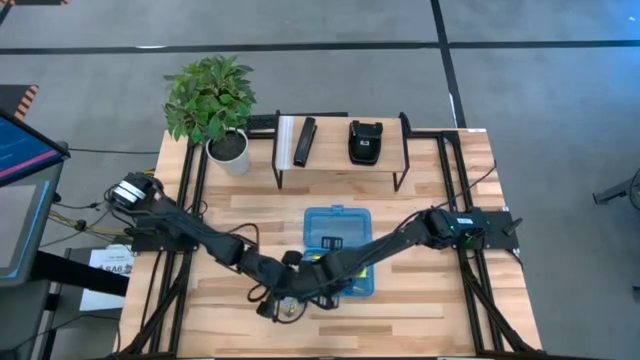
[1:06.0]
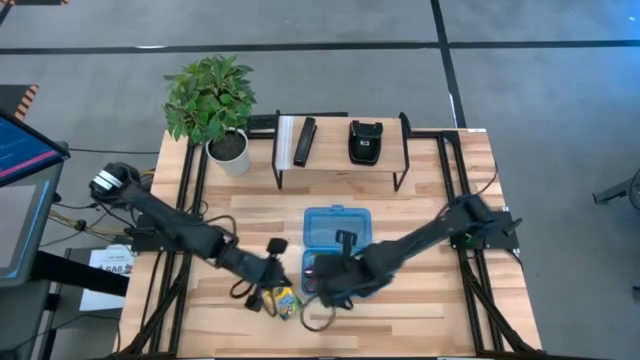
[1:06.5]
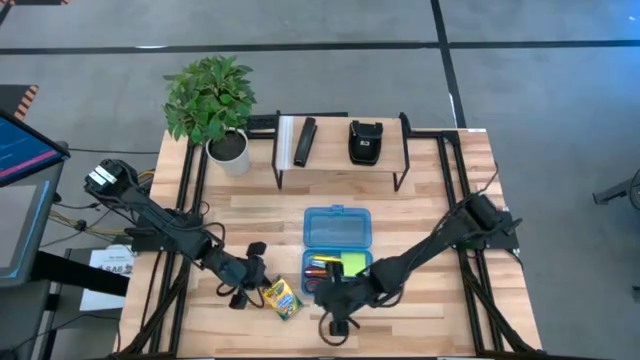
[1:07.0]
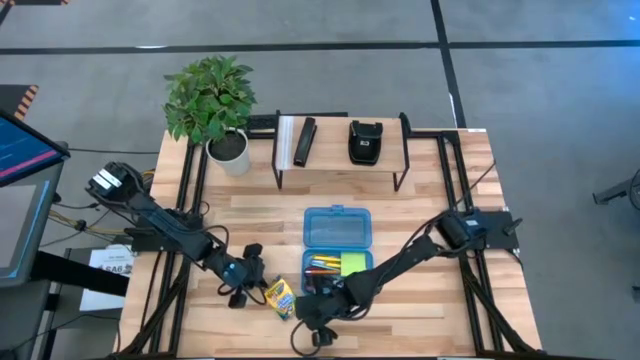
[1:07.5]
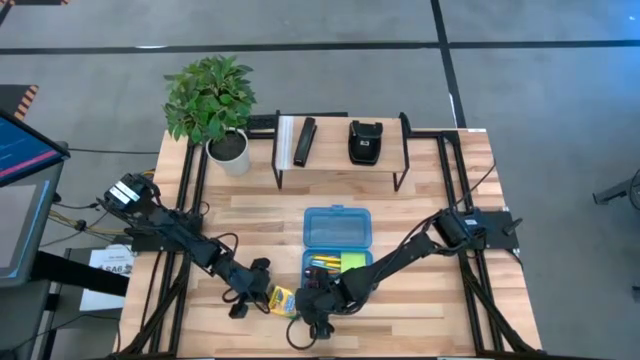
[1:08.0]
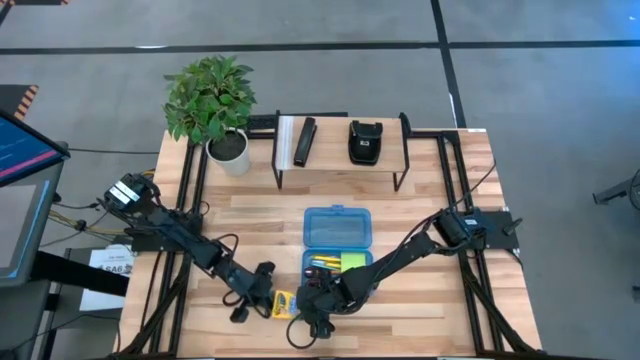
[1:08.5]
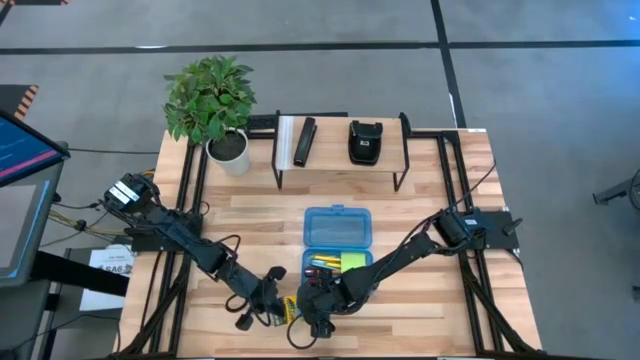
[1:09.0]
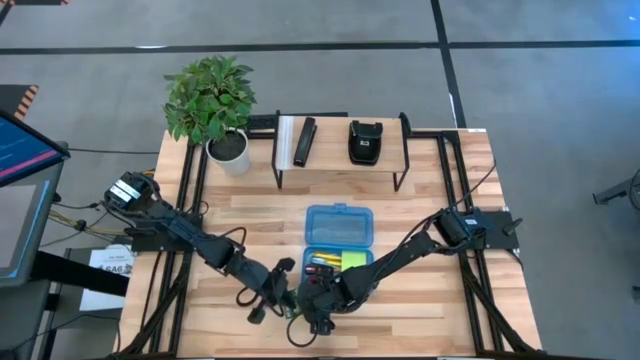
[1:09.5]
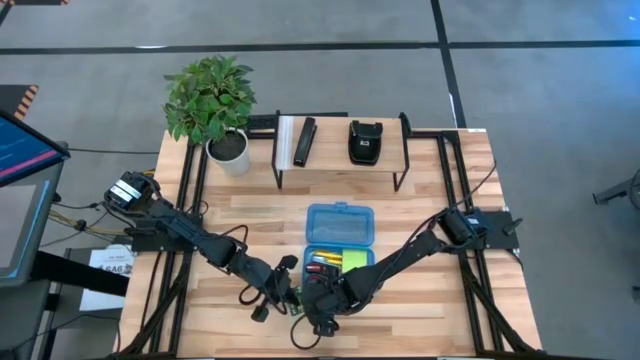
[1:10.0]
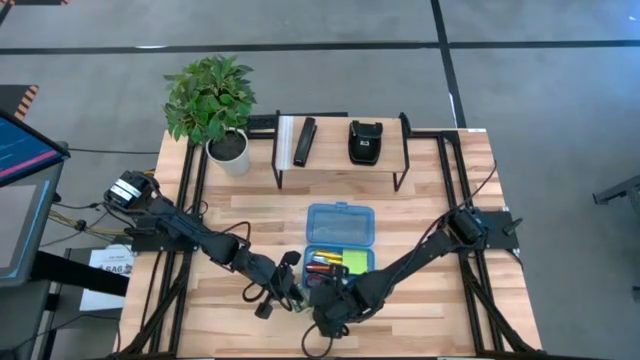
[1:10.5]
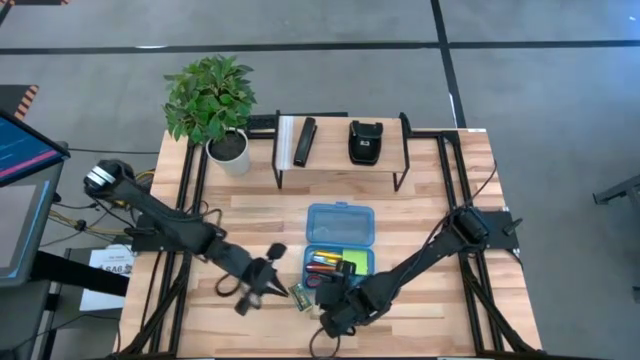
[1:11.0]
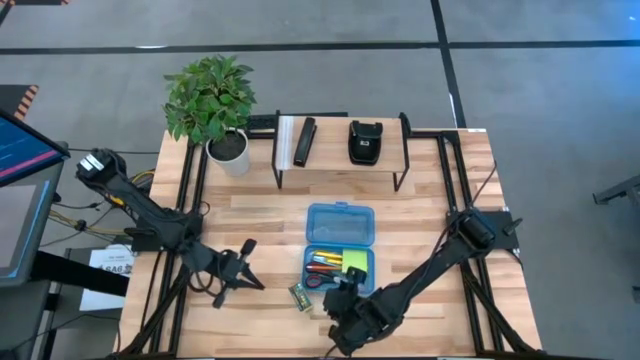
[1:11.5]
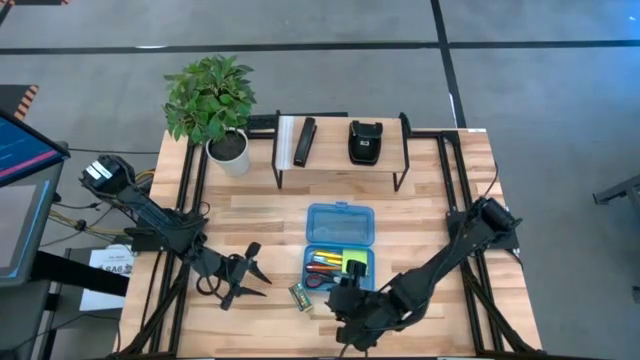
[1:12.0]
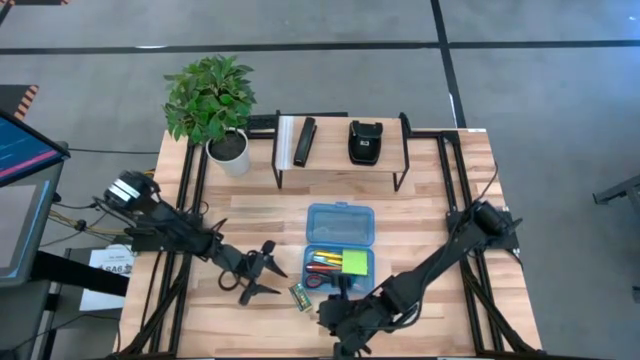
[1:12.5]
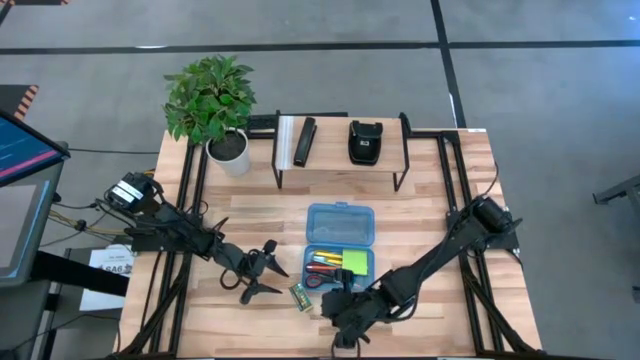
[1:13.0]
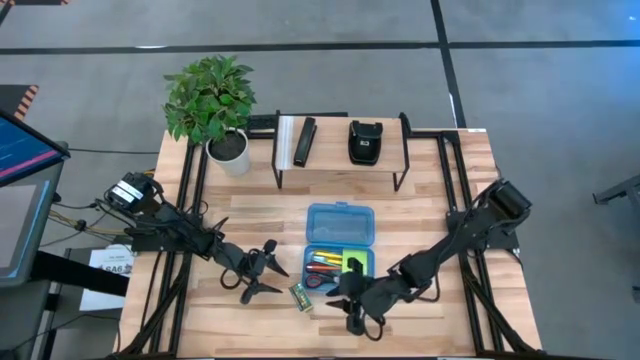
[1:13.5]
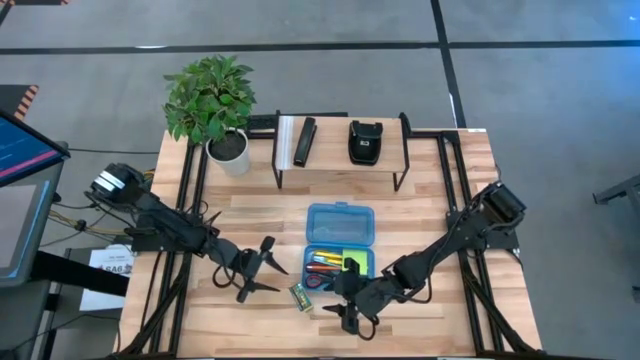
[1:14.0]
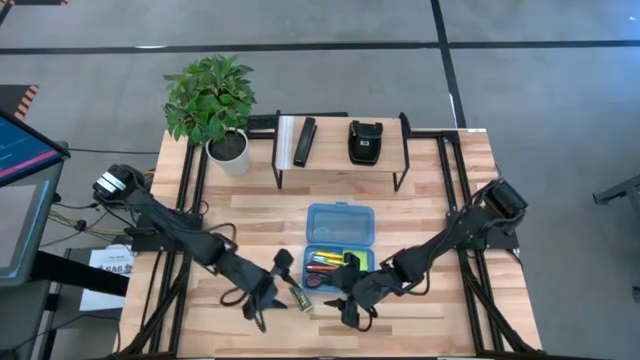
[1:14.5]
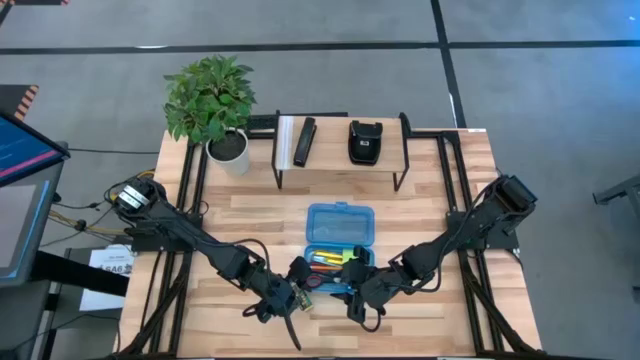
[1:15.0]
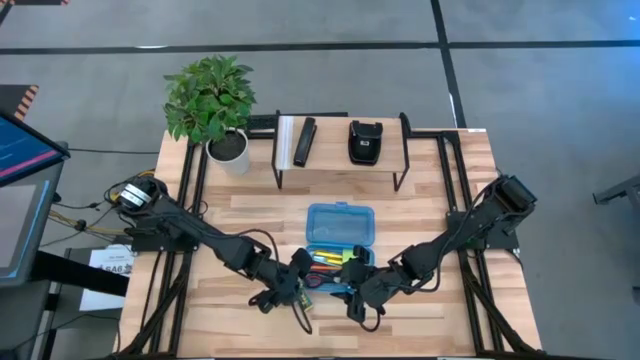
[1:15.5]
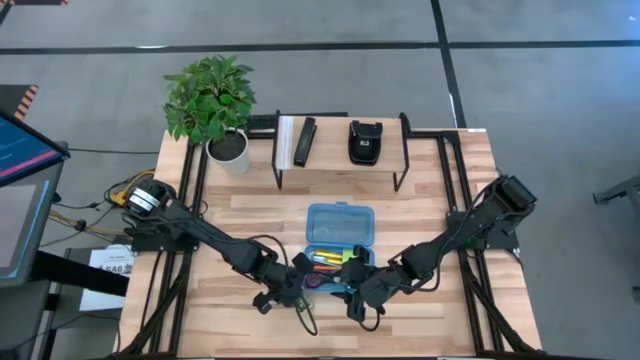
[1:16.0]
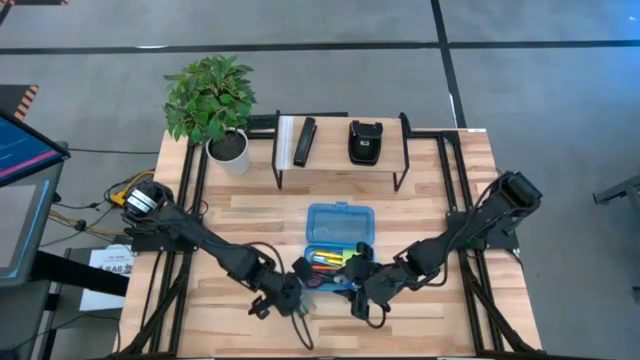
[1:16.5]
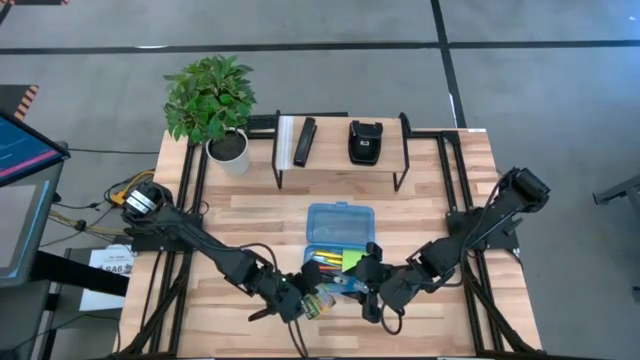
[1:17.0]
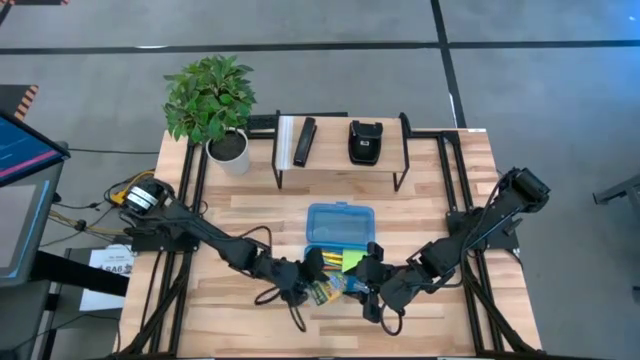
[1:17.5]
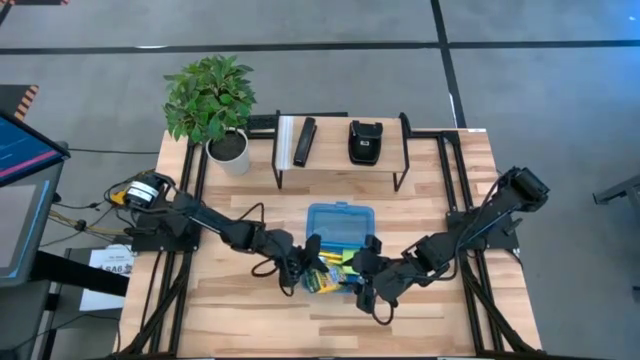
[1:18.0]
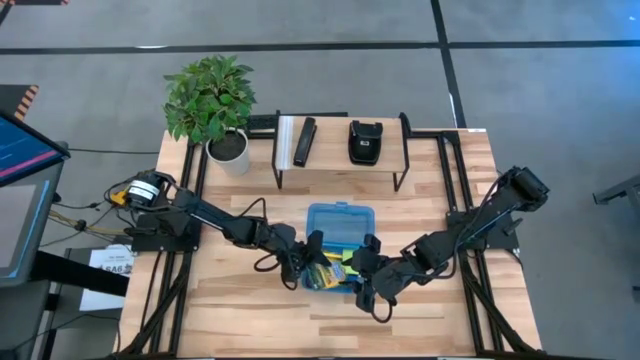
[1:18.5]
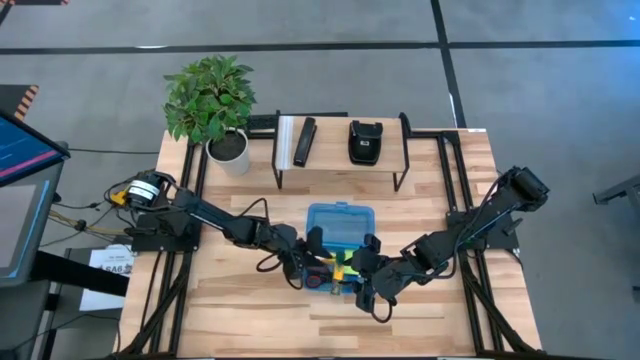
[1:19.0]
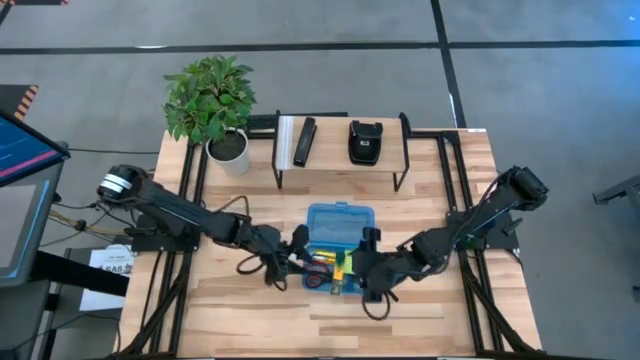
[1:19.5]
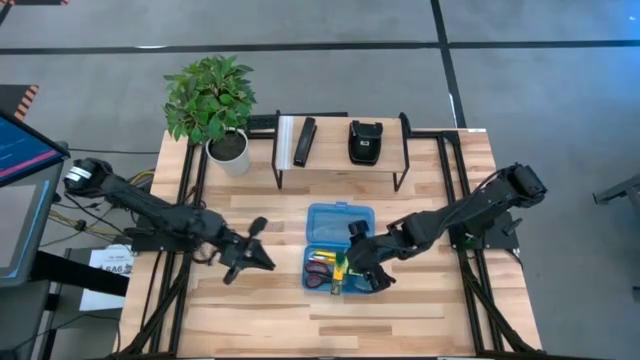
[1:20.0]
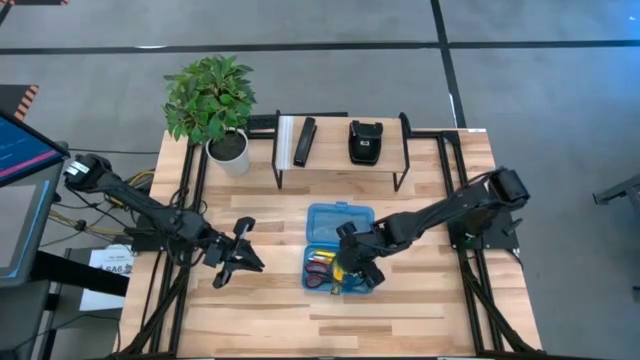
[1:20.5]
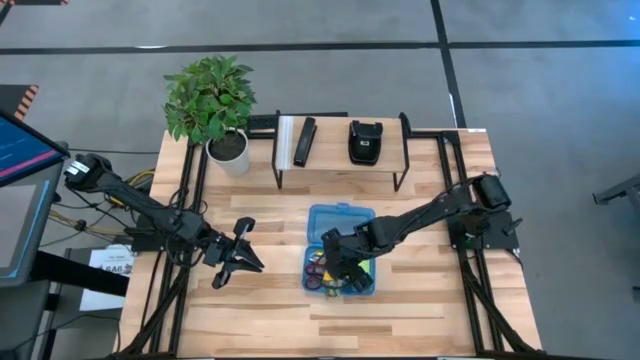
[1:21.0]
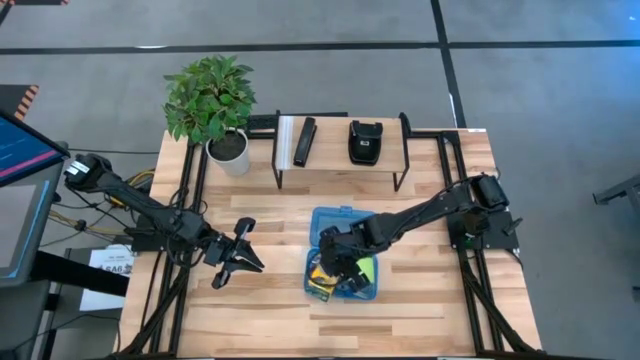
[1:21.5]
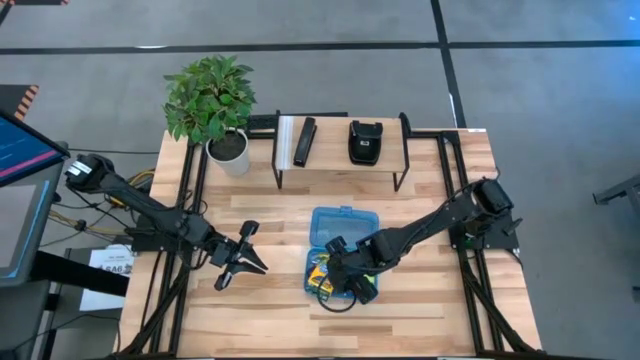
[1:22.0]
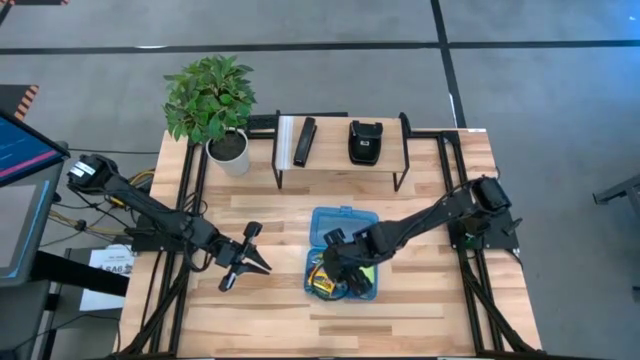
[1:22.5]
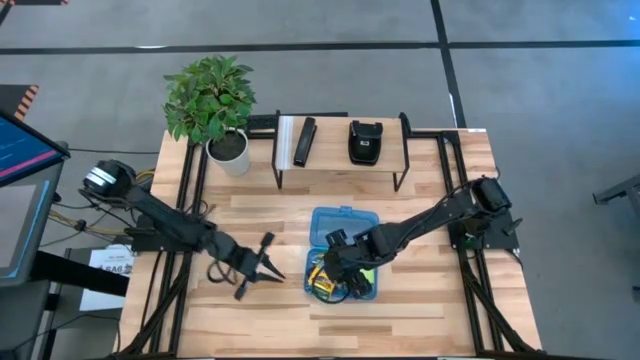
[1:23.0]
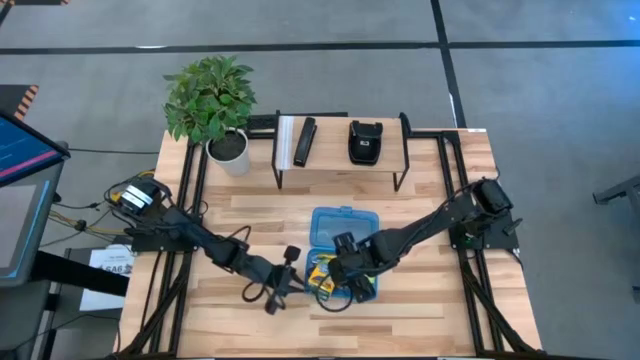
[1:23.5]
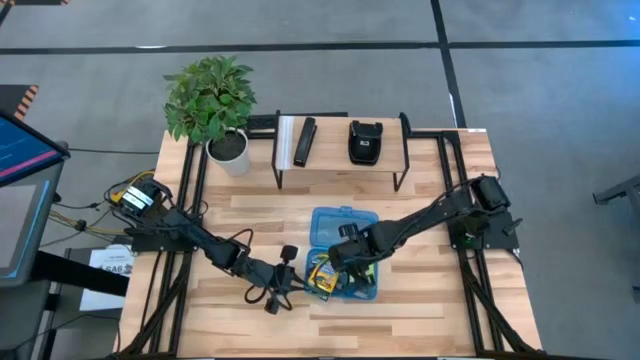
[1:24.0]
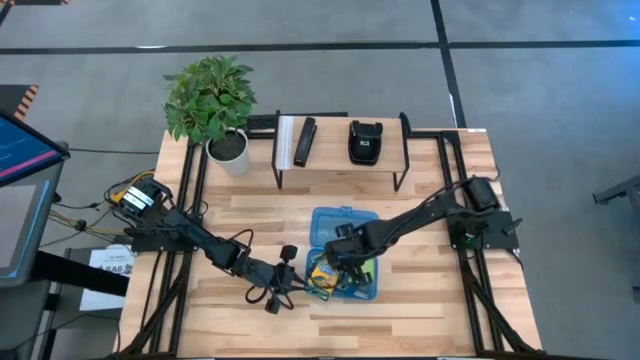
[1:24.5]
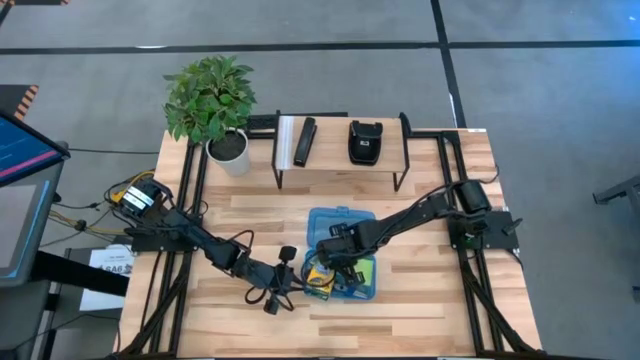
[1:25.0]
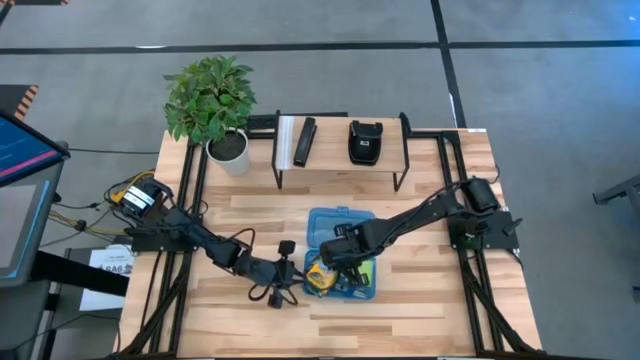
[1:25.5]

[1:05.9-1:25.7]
Task: Pack school essentials
Put the box of crayons into the supply box

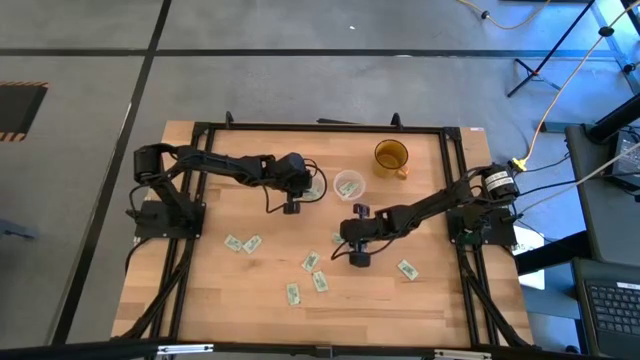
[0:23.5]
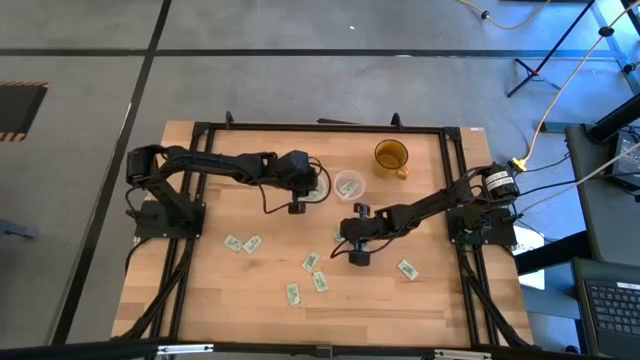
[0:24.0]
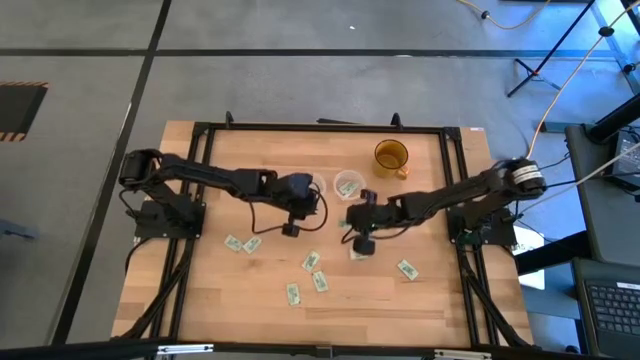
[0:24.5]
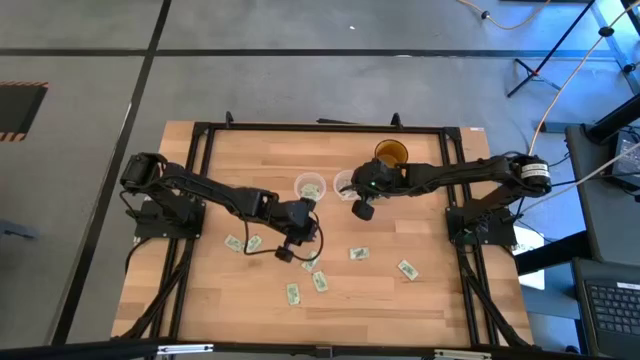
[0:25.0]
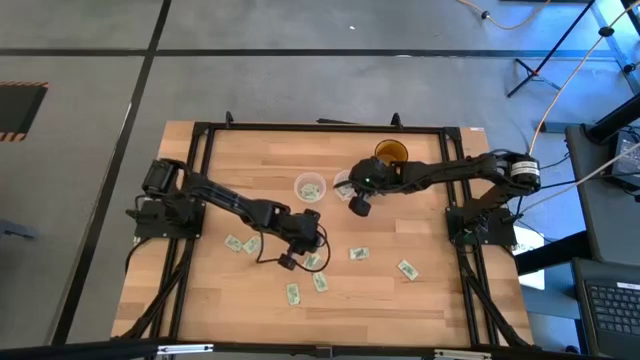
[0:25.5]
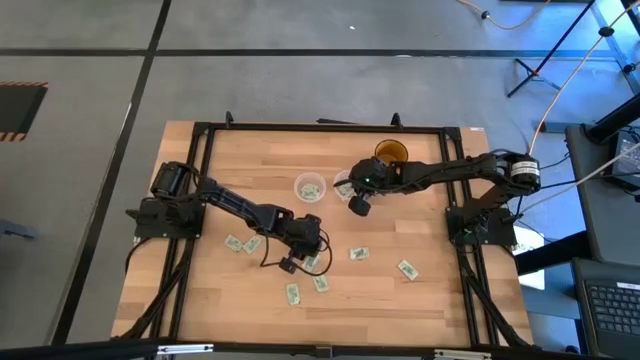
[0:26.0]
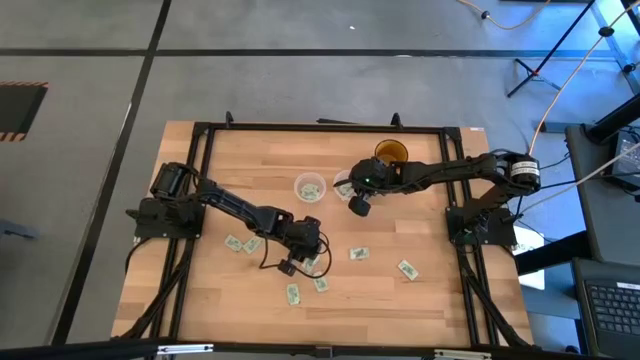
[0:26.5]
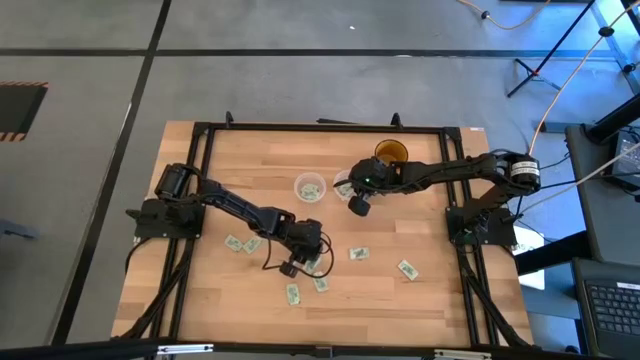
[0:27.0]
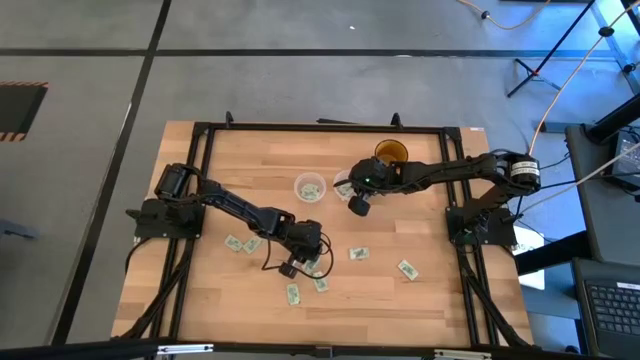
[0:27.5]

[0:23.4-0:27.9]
Task: Pick and place Stevia / Truvia into bins
Put the stevia packet into the right transparent container
